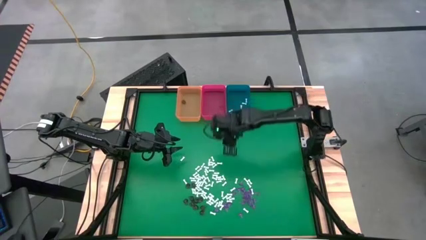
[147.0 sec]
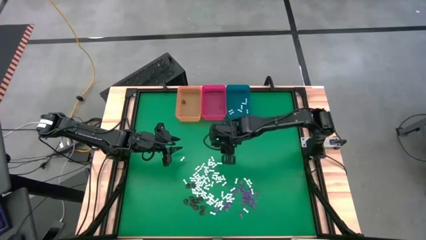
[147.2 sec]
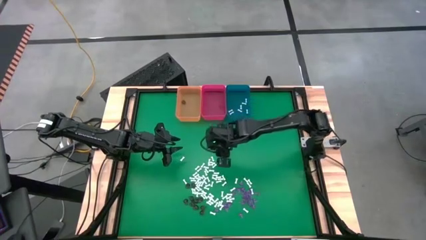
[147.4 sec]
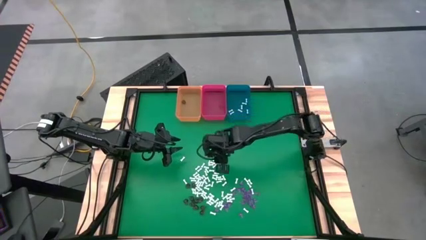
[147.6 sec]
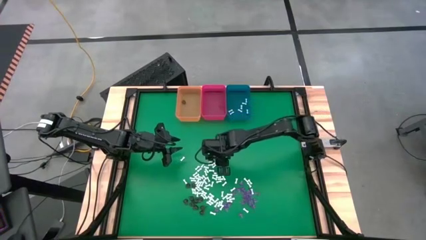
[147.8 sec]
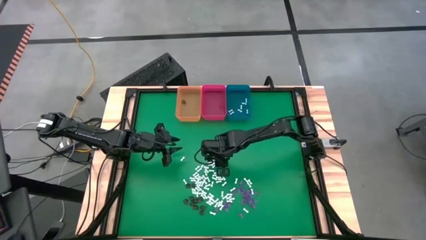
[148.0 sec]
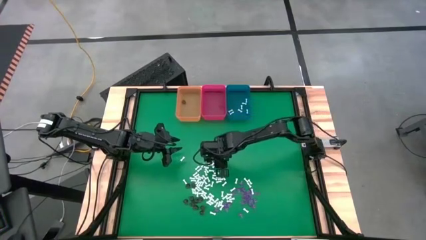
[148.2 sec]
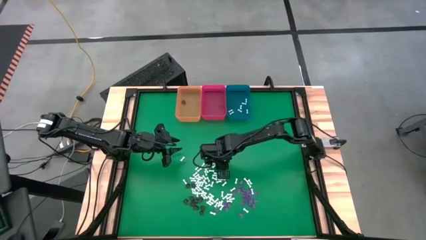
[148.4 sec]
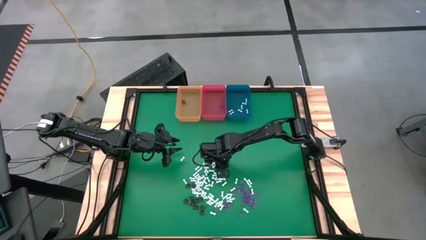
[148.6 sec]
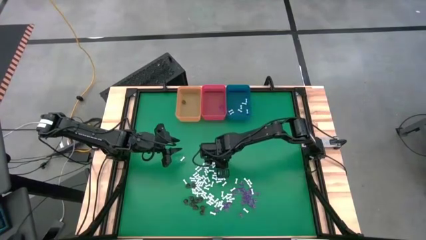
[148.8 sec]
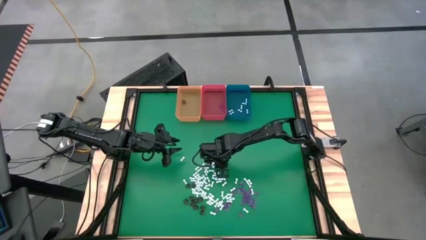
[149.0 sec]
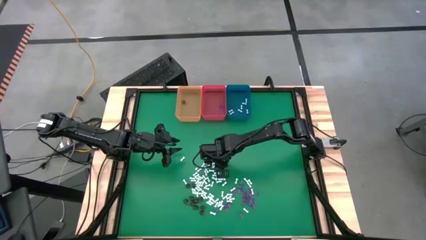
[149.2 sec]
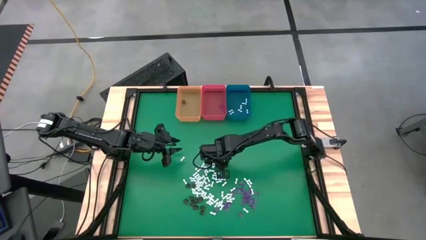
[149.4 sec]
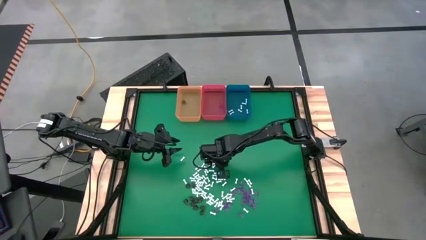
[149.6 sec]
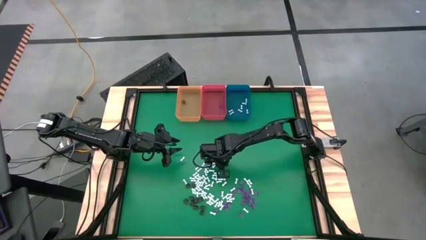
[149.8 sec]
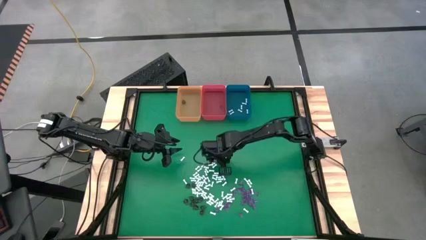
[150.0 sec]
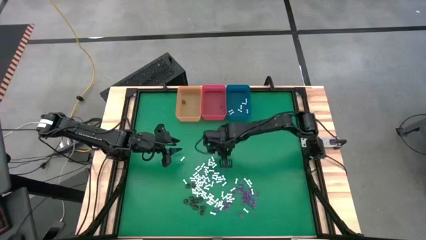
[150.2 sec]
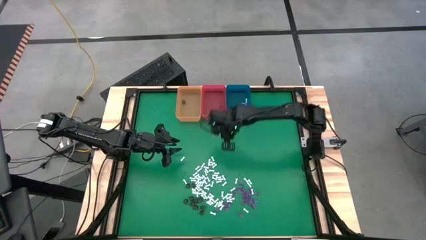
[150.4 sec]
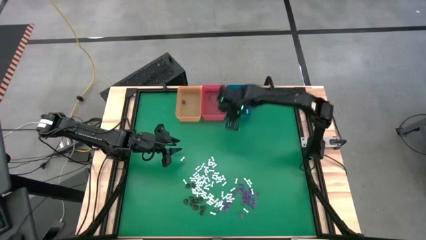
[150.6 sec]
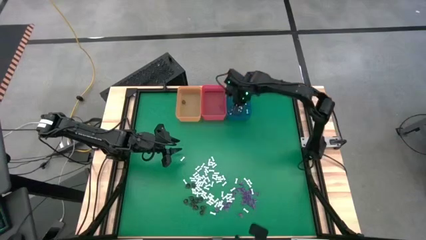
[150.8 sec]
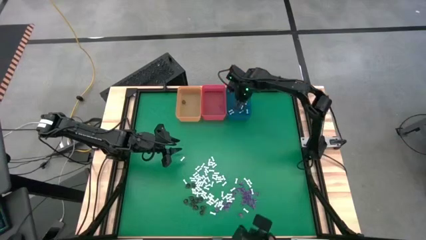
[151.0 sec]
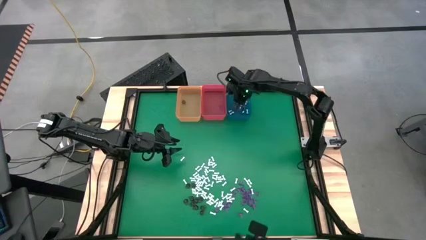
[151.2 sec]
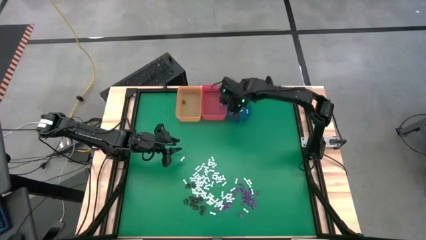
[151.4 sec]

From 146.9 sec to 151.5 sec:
Task: Sort Halloween decoration
Put the white bone toy into the blue bin

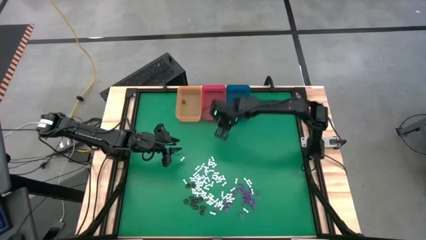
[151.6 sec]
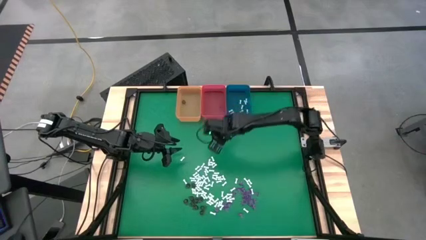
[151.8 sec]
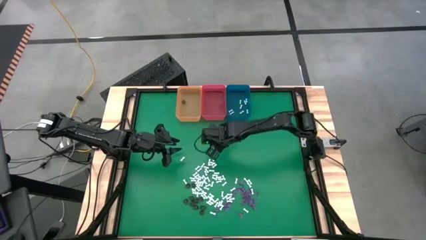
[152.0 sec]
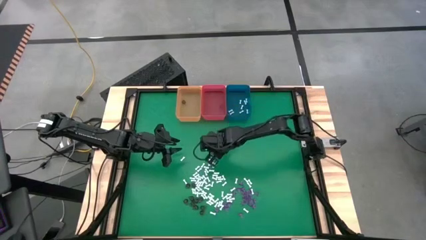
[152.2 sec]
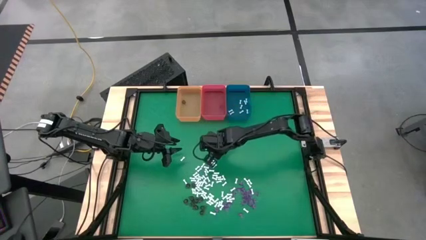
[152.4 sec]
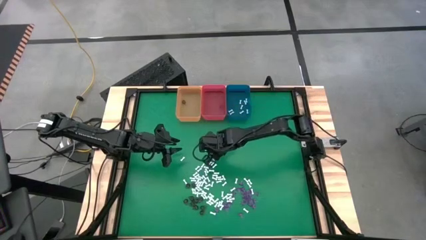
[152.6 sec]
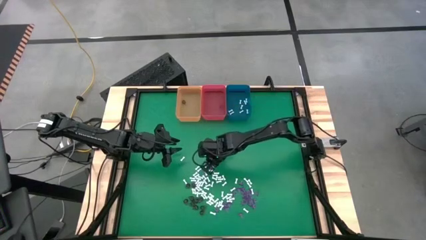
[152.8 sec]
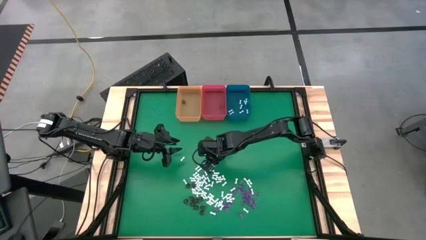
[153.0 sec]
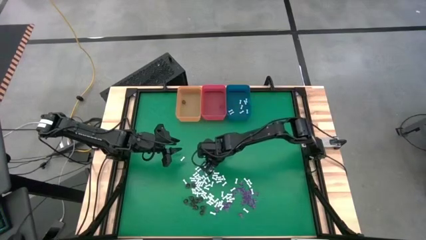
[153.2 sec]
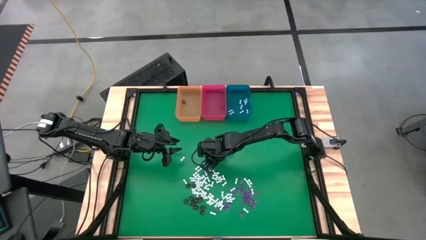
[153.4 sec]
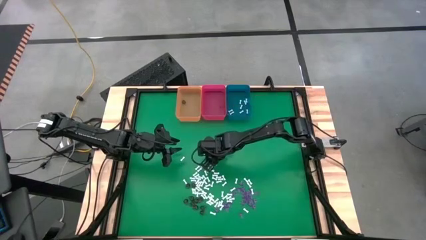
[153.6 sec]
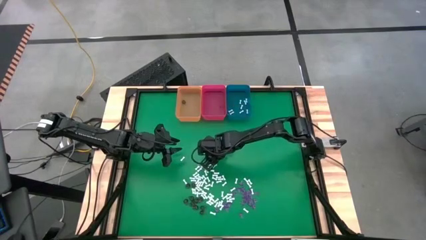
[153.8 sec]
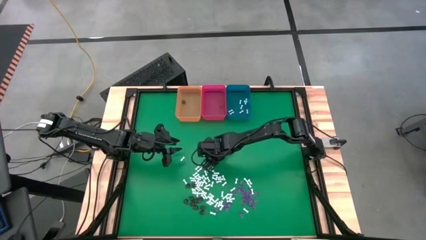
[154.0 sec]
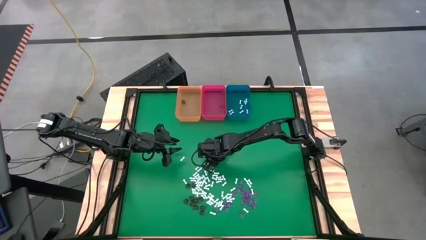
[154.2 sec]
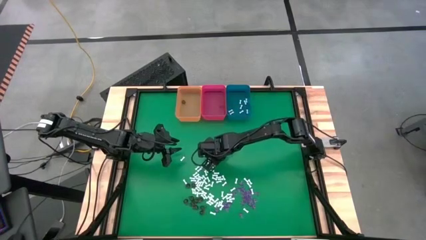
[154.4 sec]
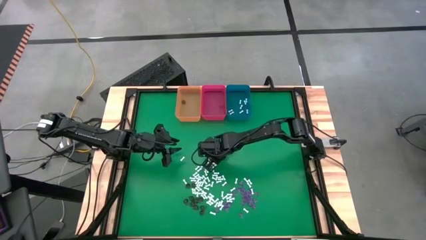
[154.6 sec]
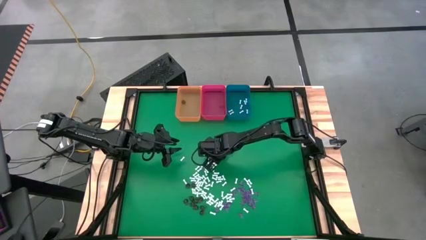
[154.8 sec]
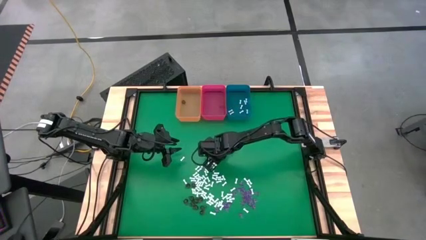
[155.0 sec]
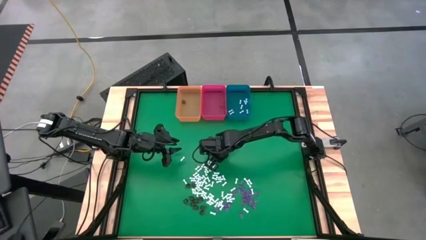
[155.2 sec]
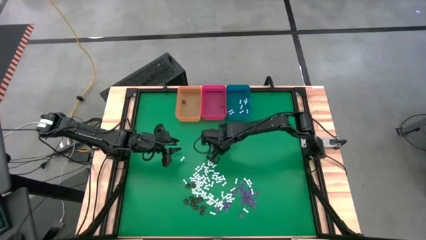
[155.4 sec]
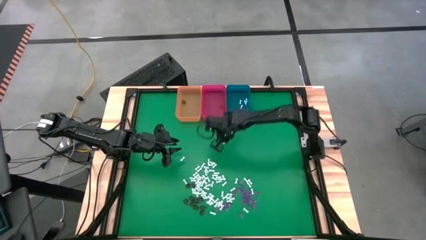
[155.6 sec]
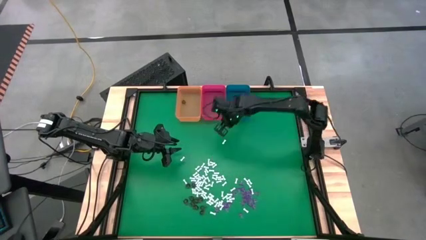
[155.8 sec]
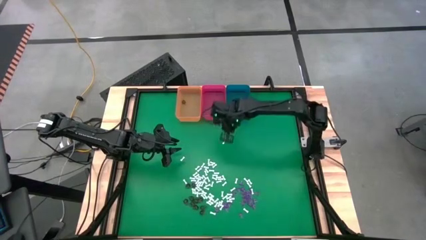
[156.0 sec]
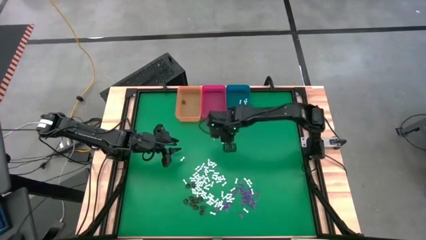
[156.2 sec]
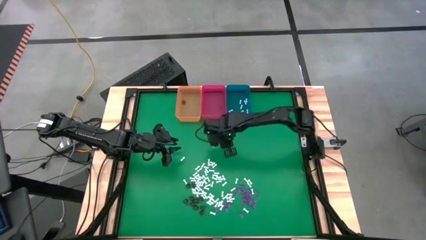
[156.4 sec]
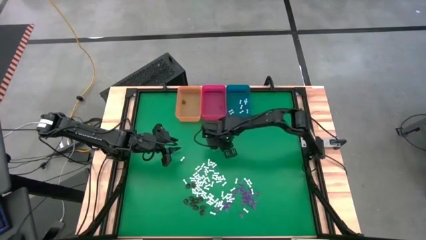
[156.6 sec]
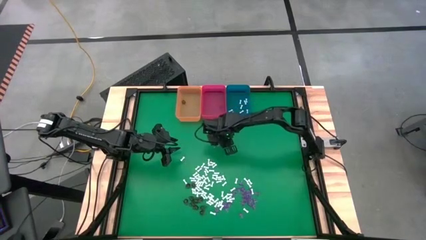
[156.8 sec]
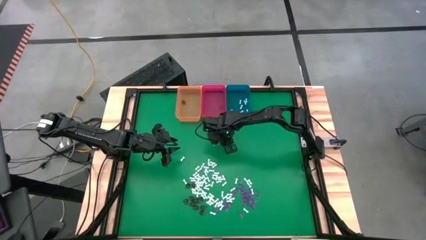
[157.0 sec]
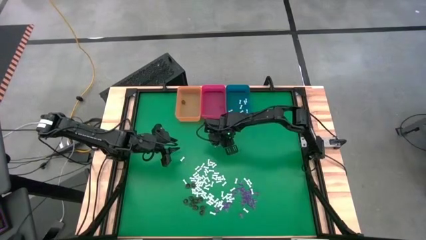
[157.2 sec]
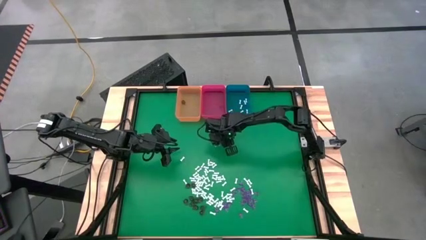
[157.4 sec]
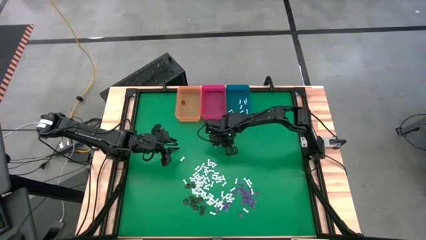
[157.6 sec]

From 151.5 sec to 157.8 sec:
Put the white bone toy into the blue bin

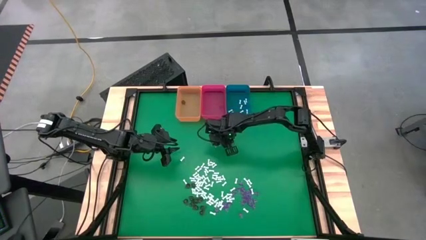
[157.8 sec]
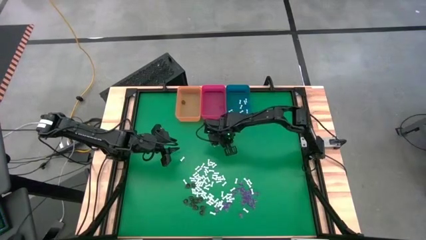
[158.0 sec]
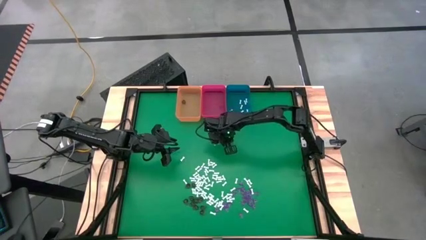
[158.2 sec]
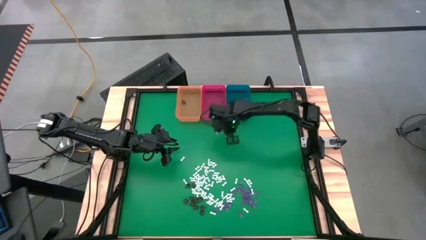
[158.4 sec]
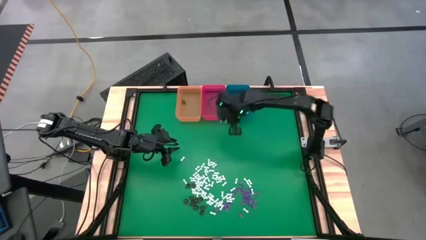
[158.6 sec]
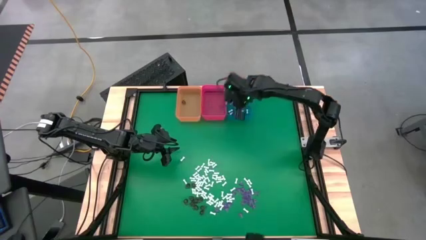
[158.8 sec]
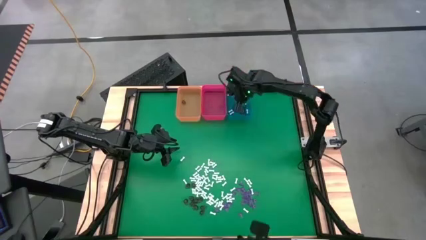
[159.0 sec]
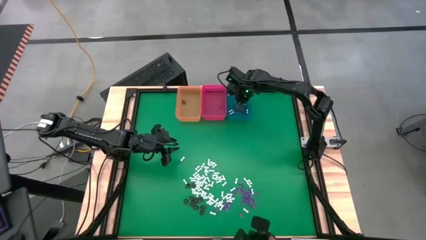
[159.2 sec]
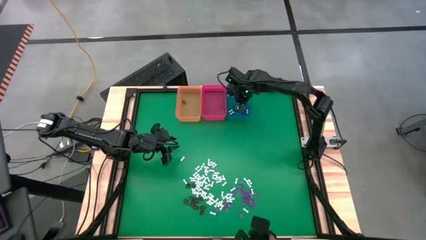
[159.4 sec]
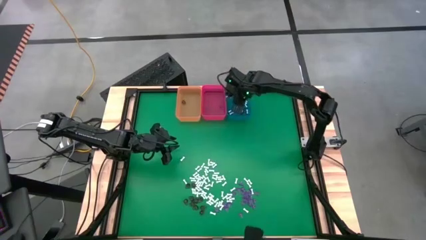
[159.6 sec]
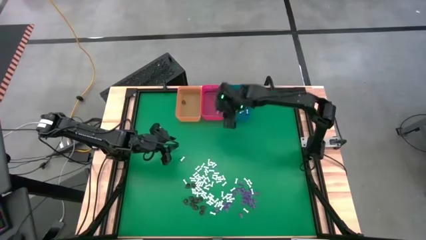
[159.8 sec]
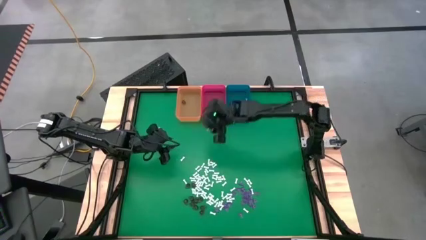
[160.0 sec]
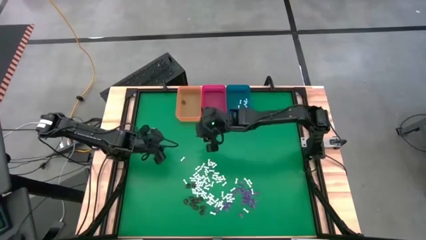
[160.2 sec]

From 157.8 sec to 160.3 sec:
Put the white bone toy into the blue bin

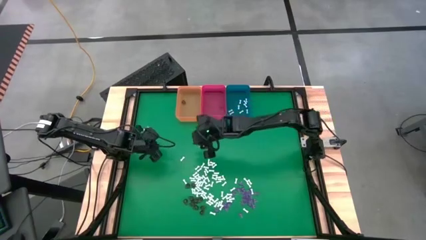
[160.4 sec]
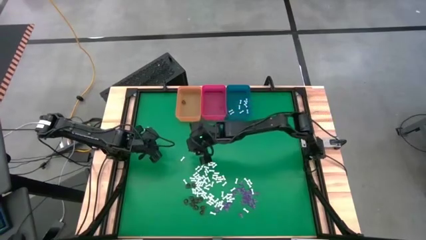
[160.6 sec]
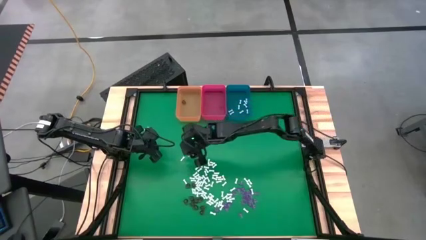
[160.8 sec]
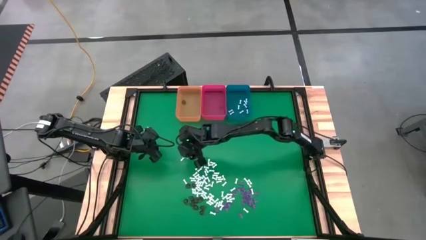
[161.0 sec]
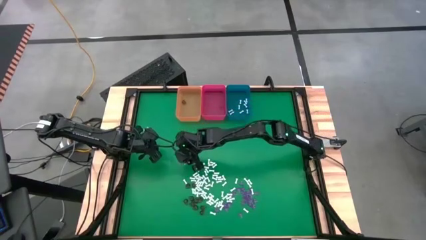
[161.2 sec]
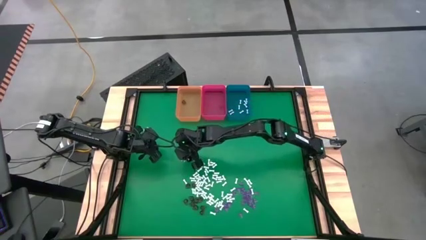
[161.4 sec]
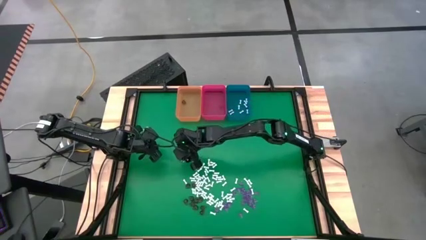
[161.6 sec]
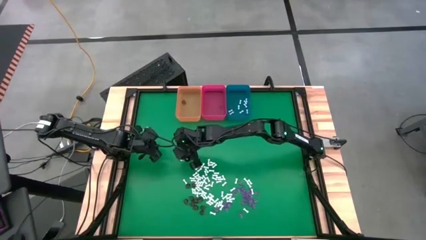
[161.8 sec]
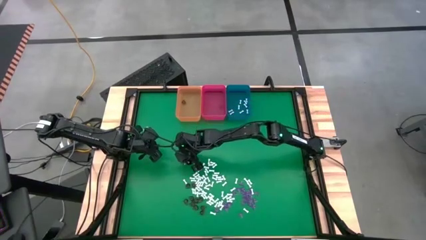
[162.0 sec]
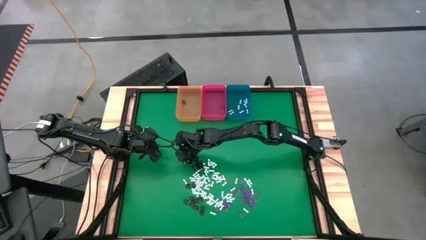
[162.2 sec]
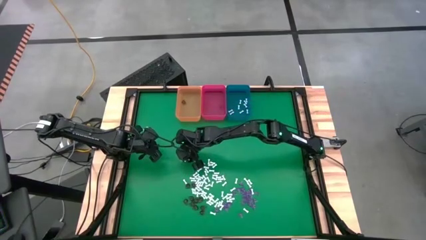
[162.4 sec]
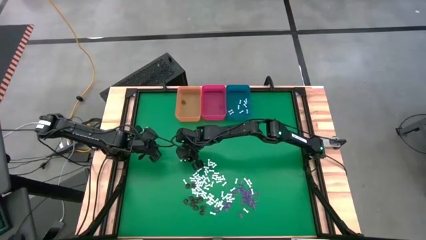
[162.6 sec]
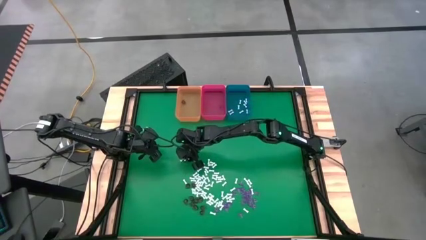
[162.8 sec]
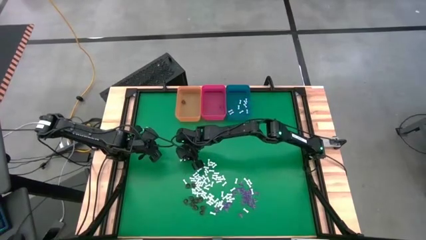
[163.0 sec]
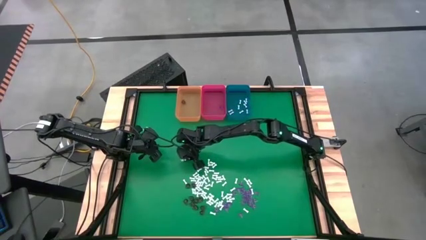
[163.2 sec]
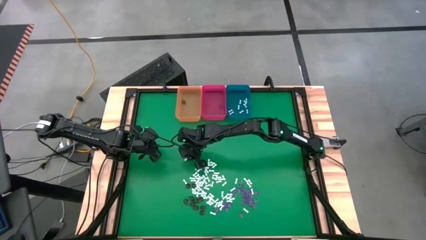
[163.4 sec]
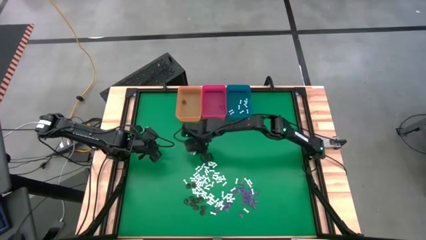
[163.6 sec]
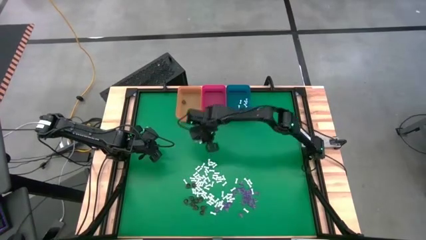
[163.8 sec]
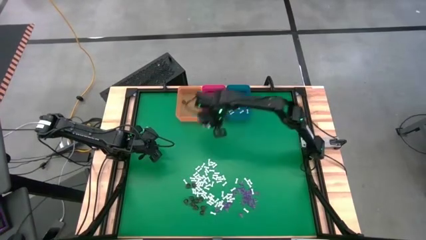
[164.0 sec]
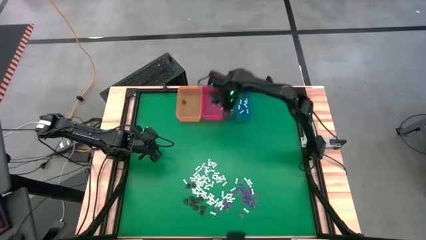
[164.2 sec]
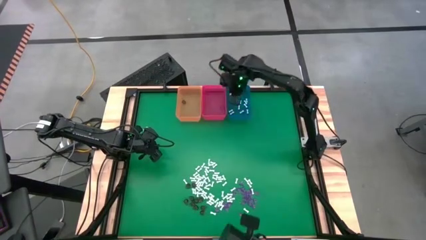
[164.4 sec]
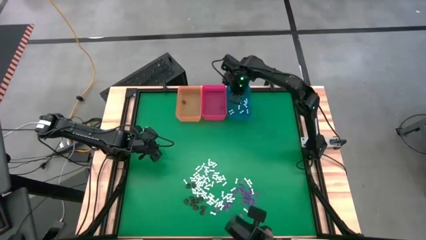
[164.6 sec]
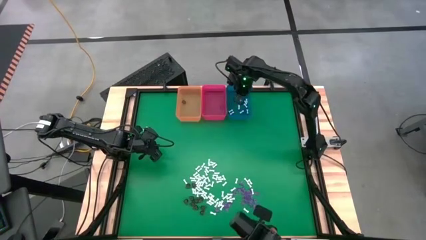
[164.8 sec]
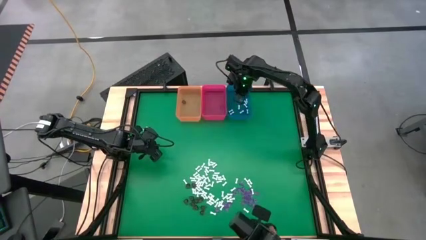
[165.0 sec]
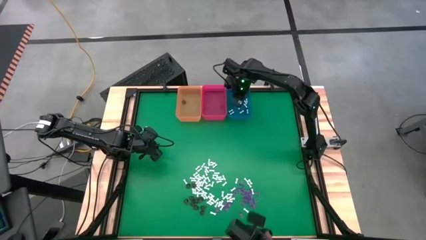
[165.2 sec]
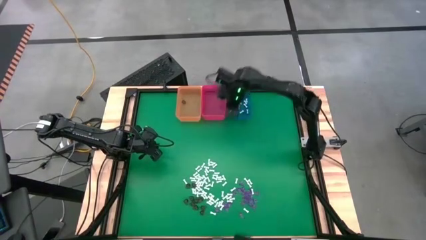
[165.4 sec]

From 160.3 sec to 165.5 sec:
Put the white bone toy into the blue bin
